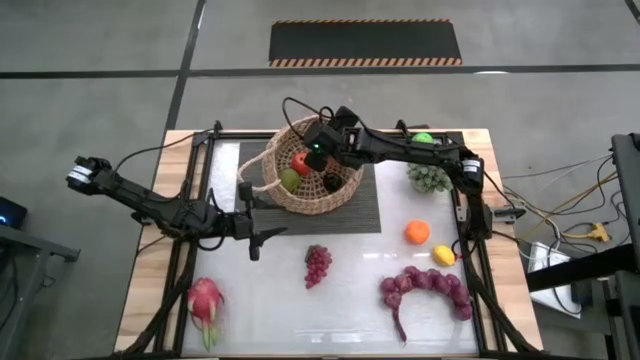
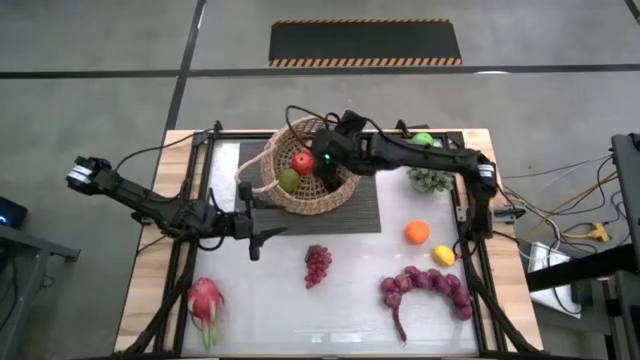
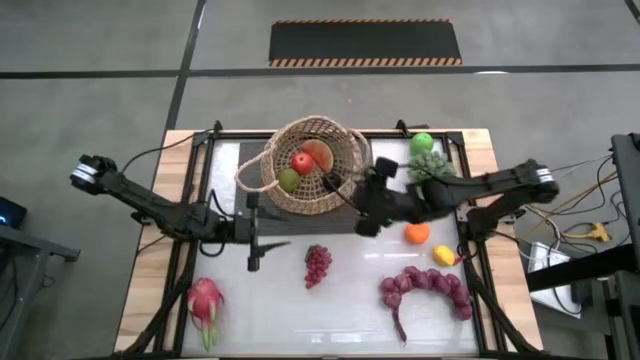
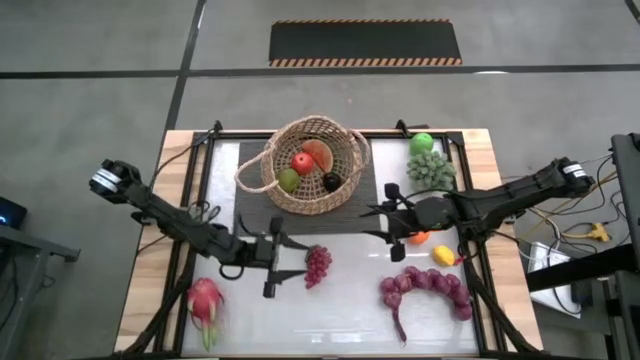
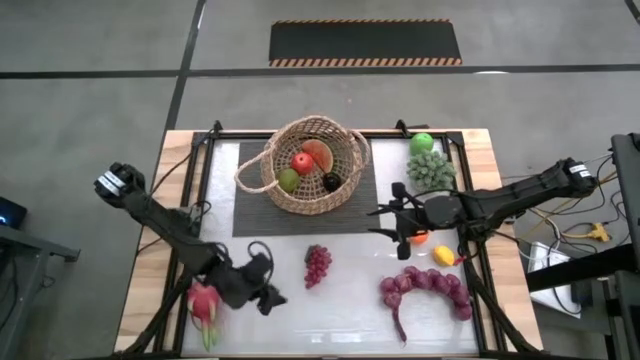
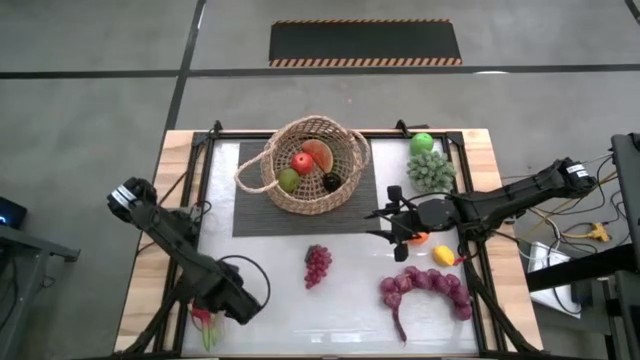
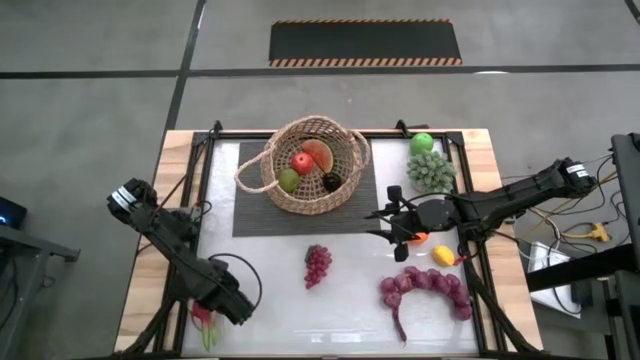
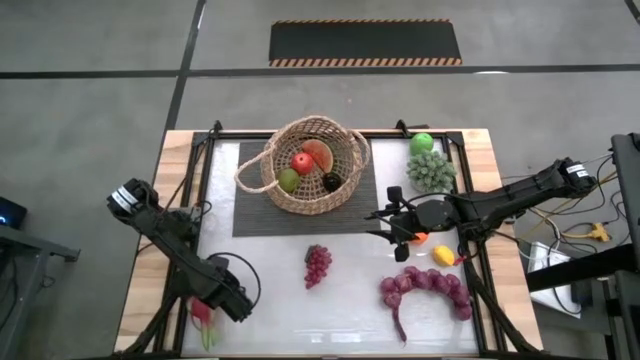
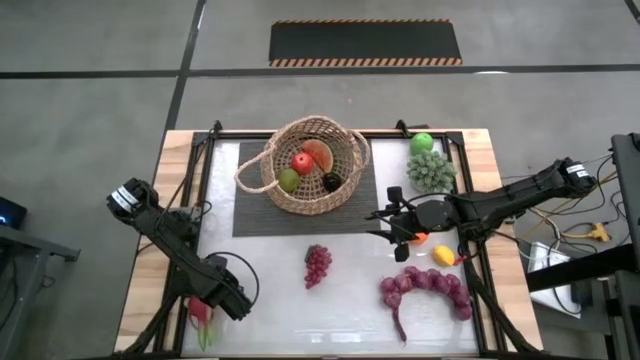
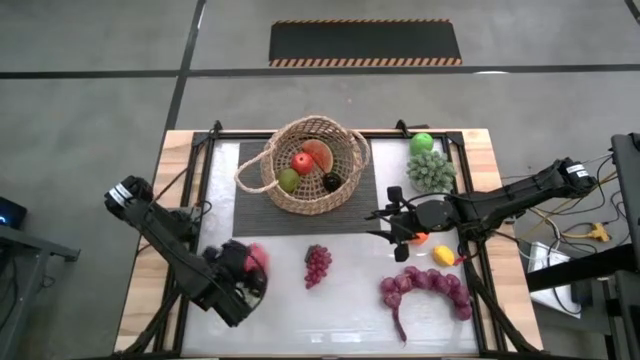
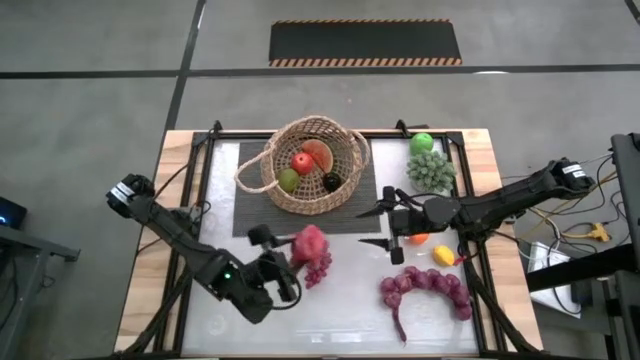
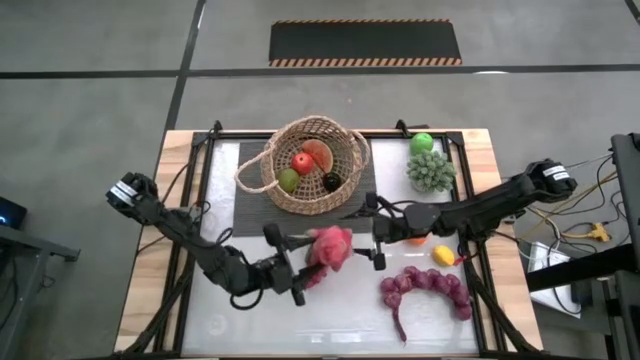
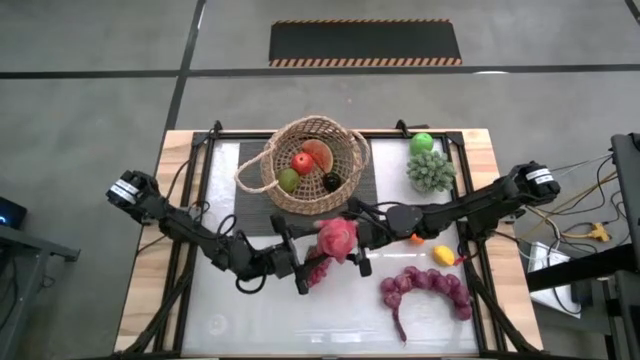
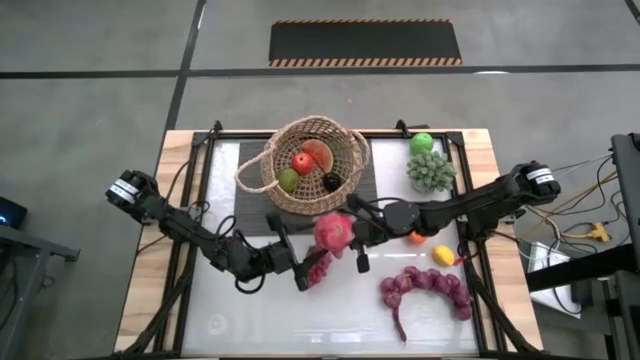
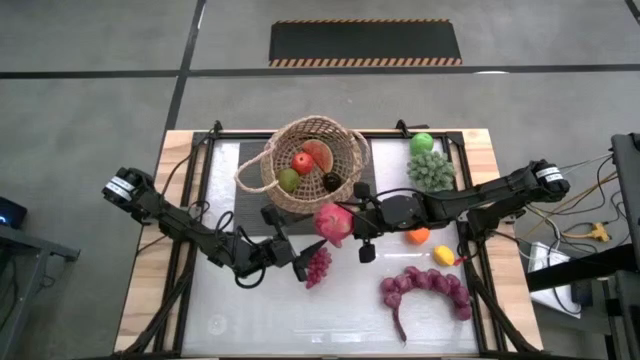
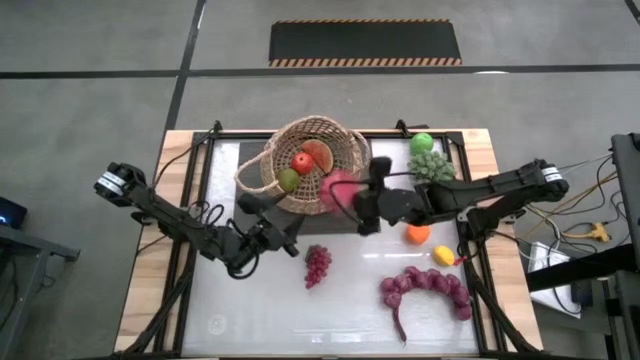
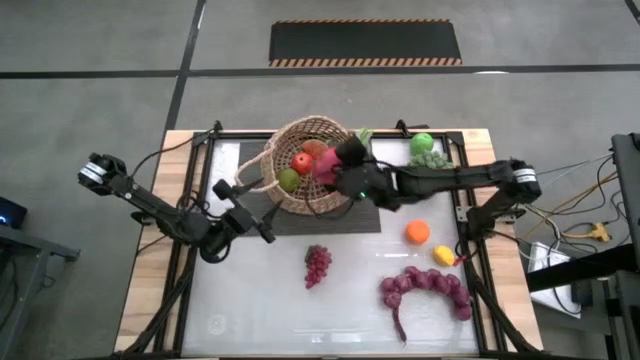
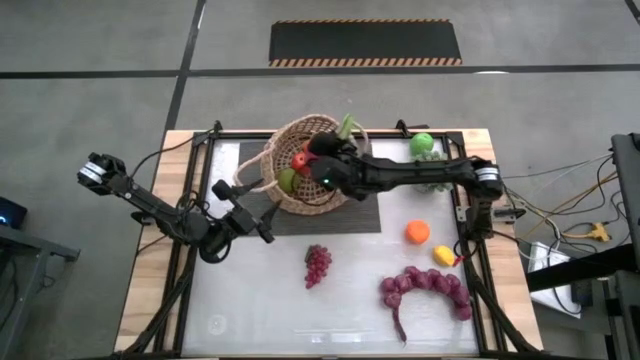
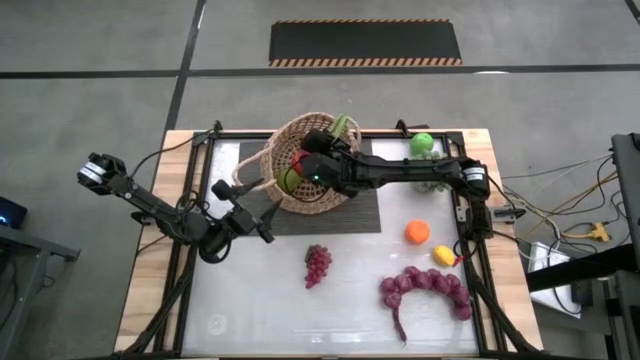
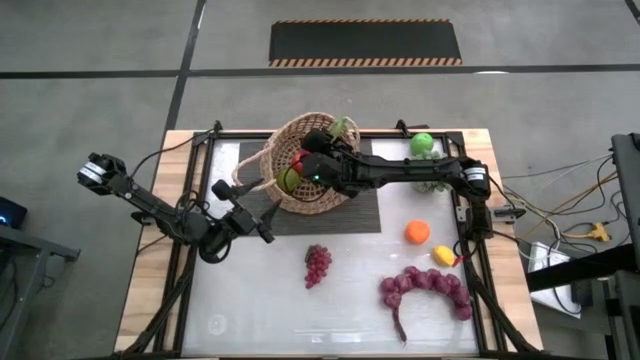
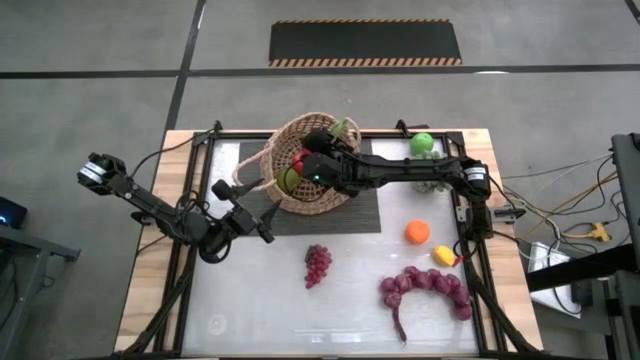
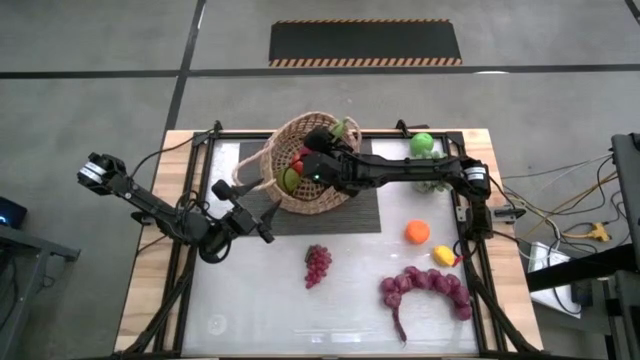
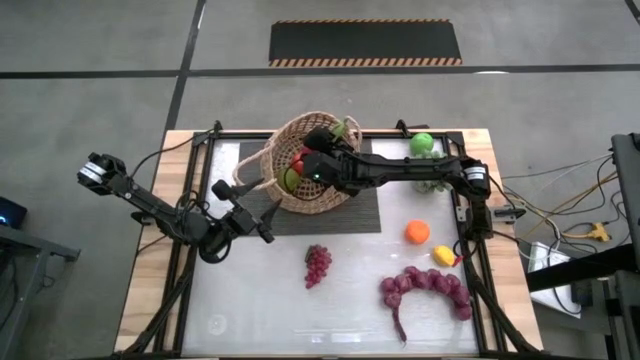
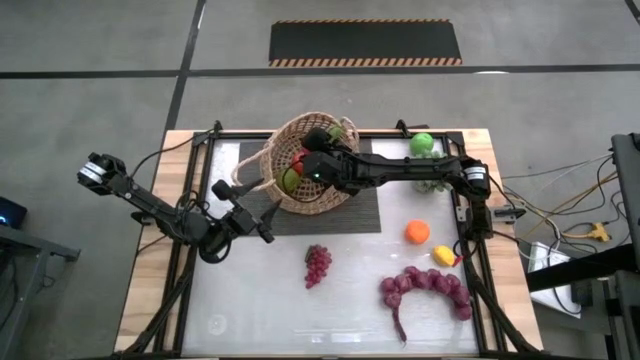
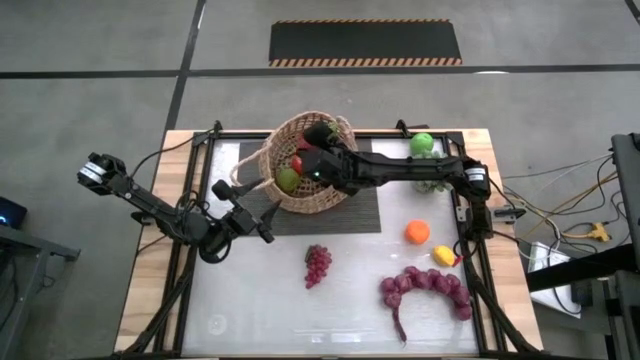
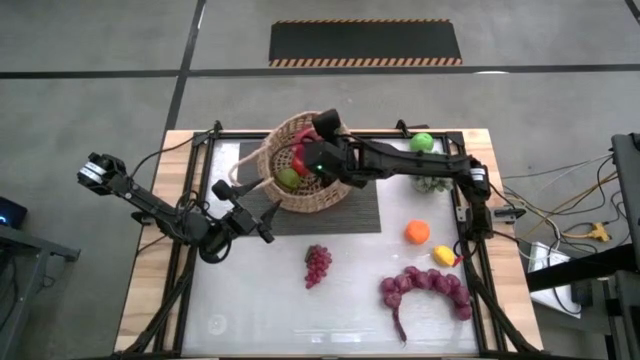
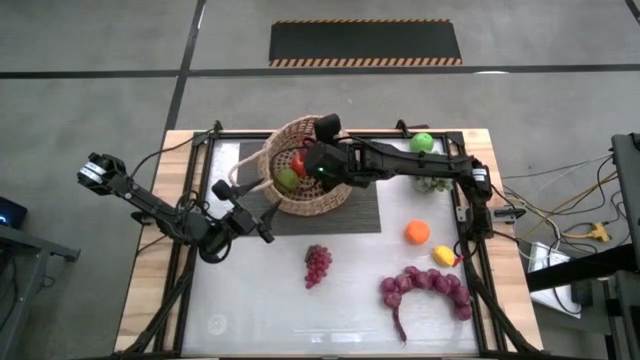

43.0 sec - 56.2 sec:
Task: Build produce basket
Put the dragon fruit into the basket

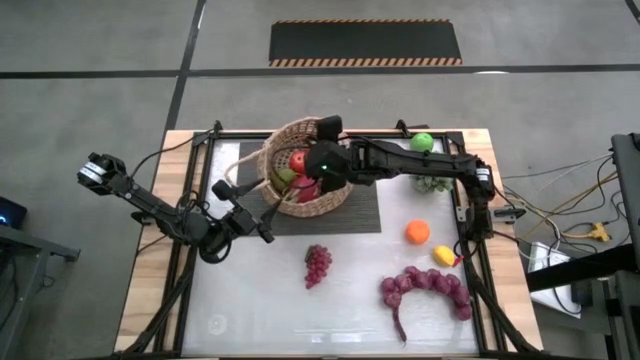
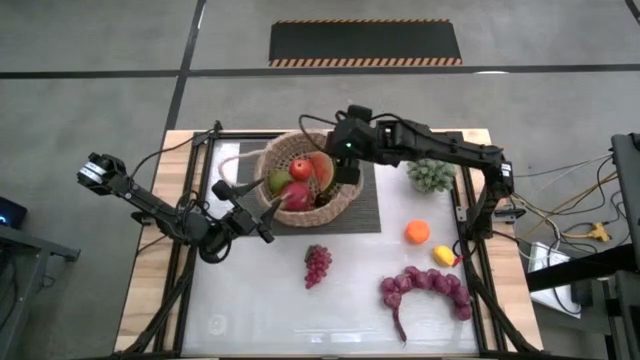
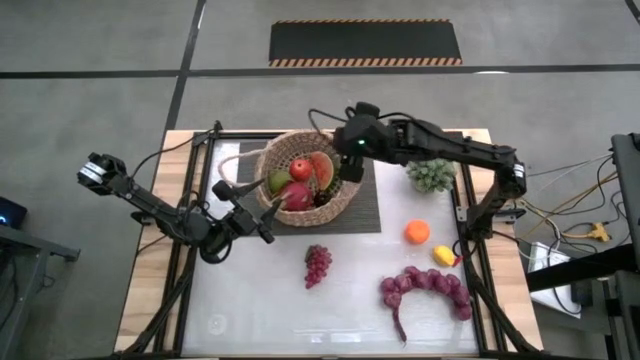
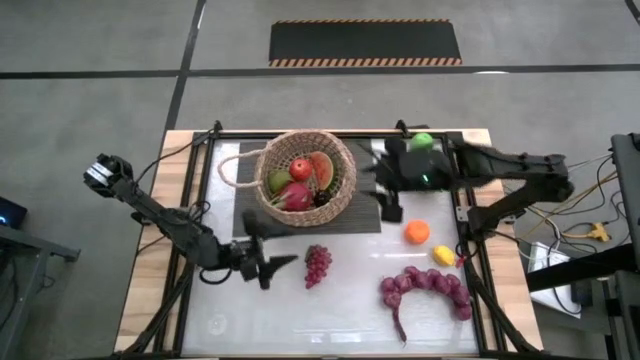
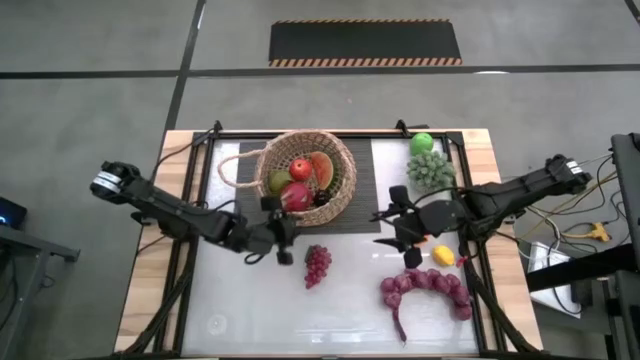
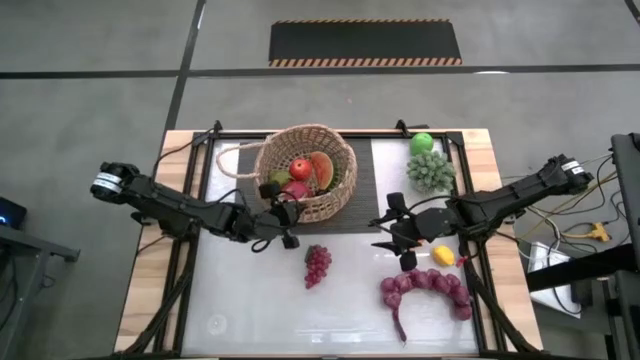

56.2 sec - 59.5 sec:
Adjust the basket

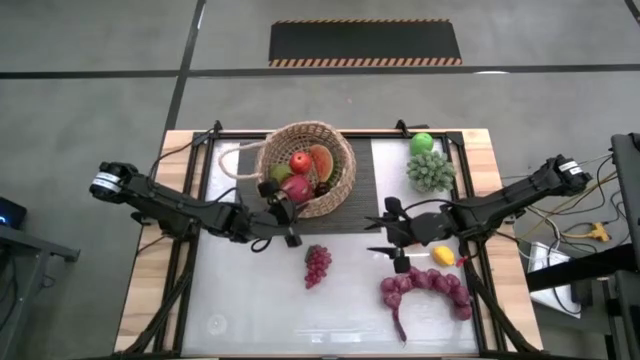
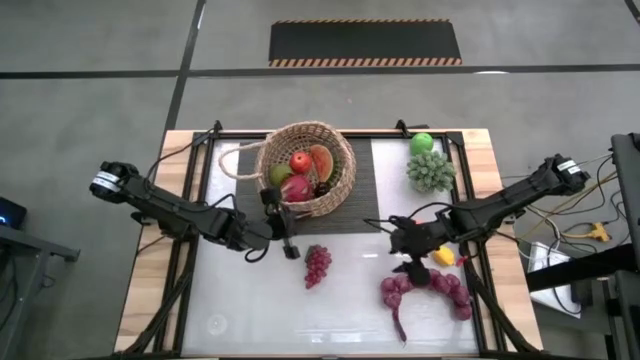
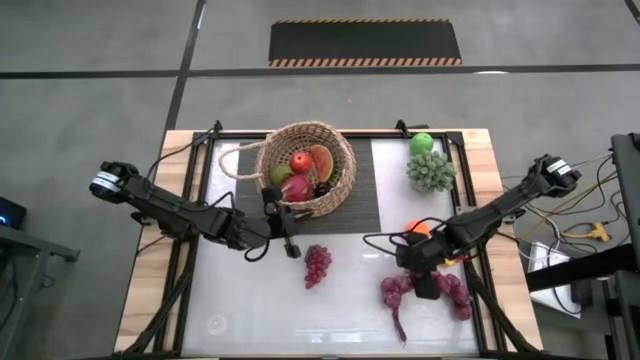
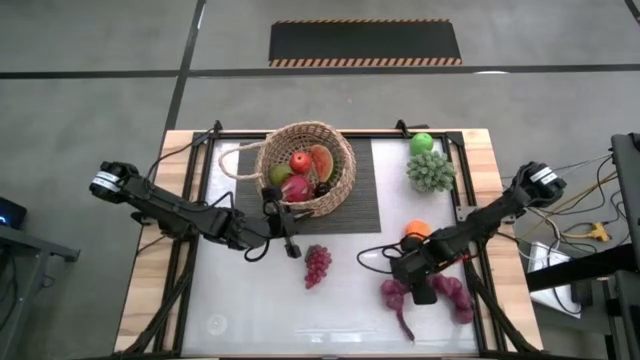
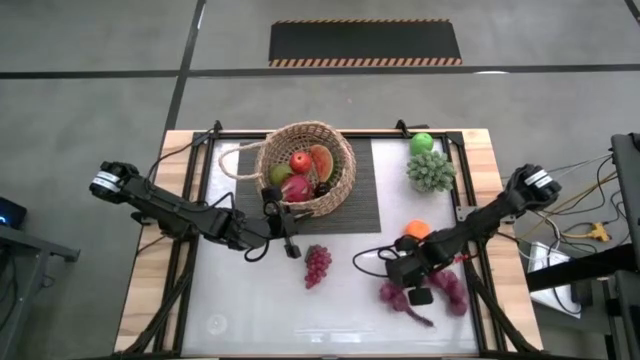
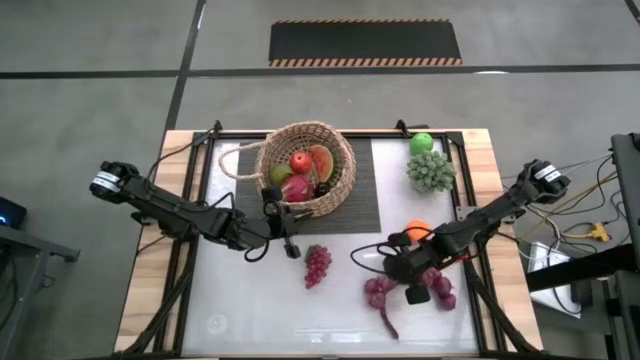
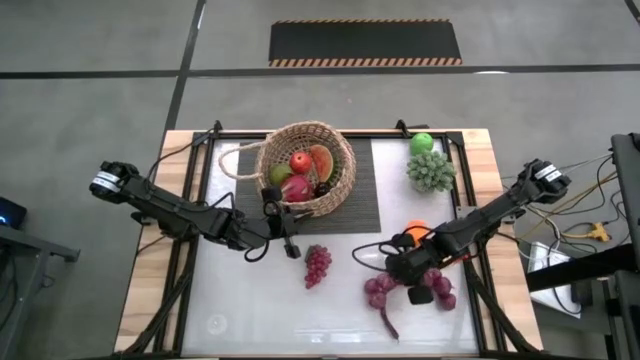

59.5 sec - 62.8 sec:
Put the purple garlic into the basket

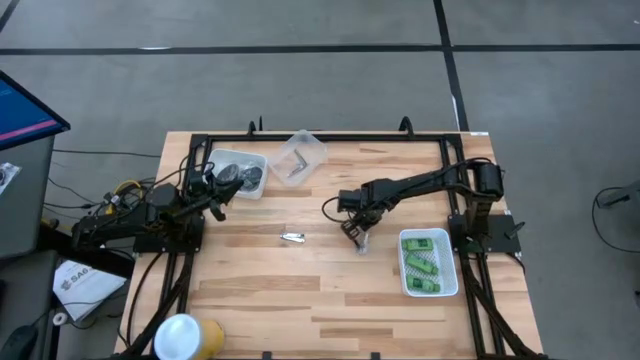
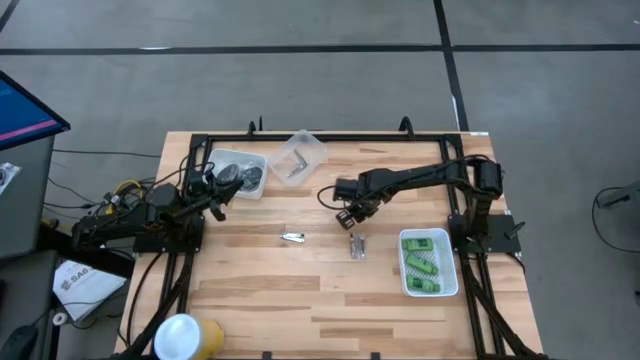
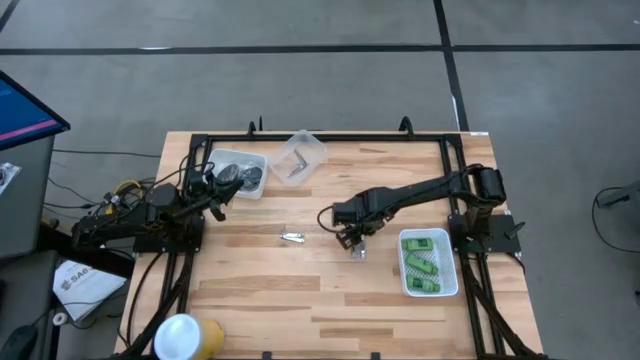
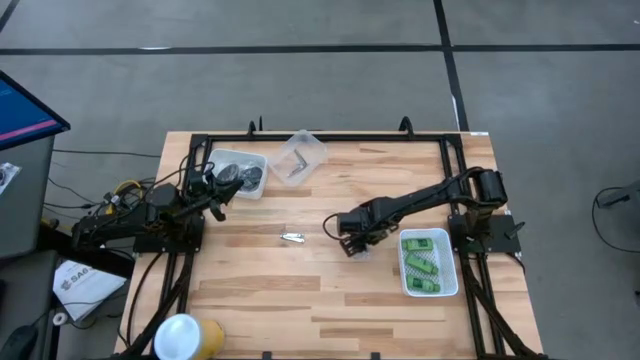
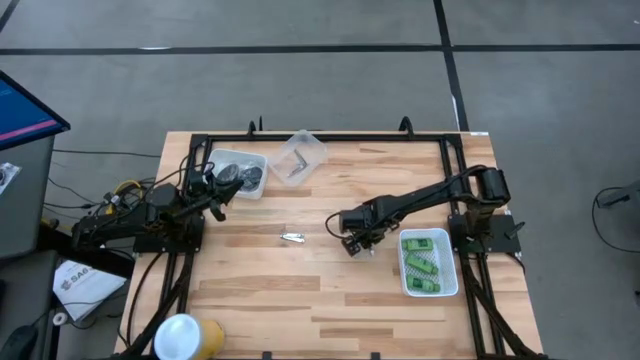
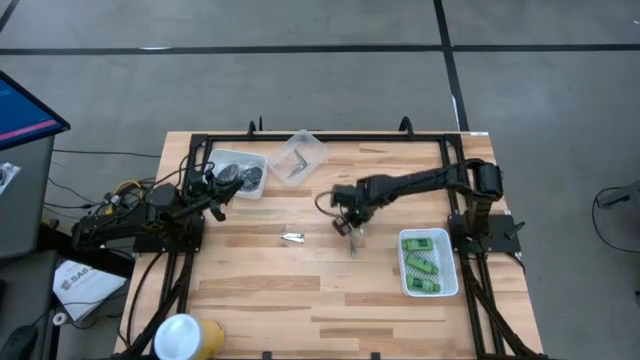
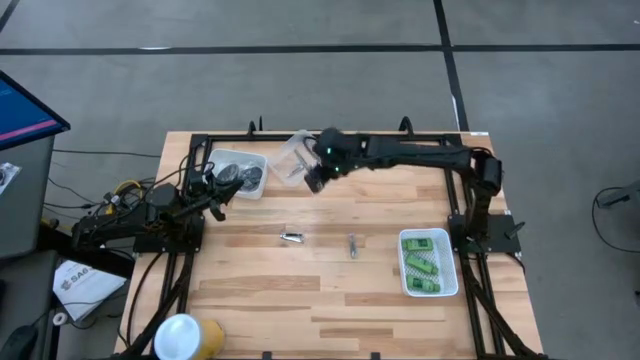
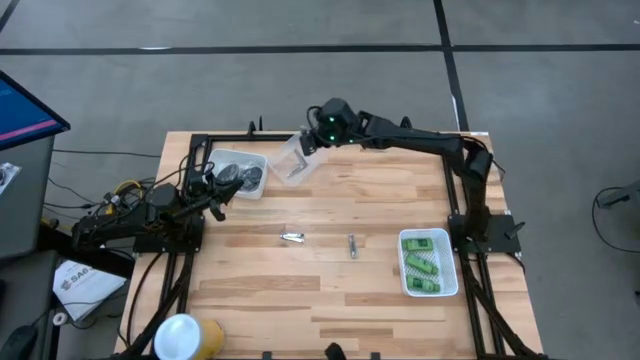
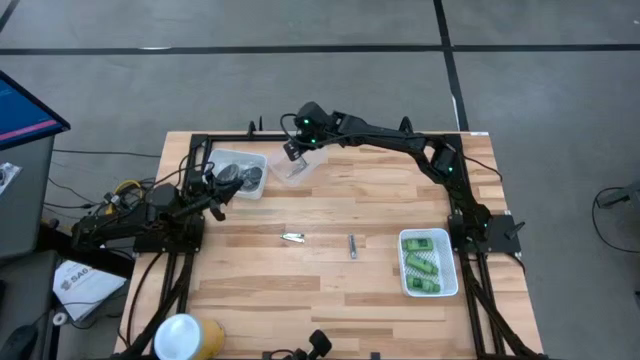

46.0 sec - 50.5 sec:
Task: Pick & Place Travel size toiletries
Put the silver nail cutter into the transparent bin
